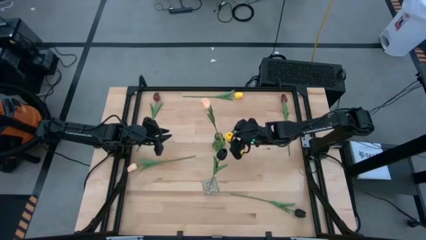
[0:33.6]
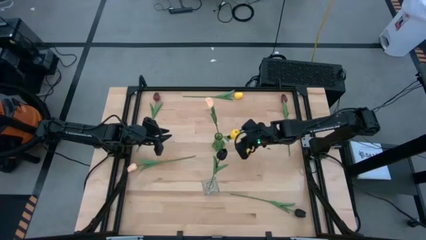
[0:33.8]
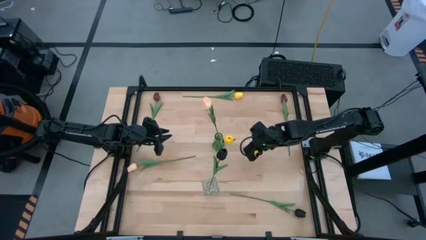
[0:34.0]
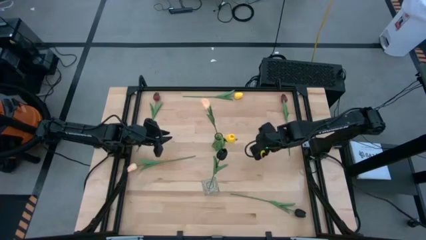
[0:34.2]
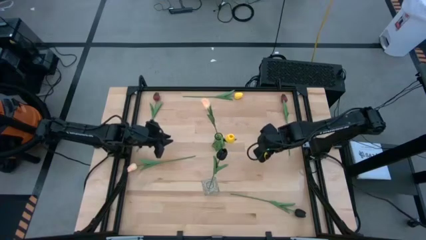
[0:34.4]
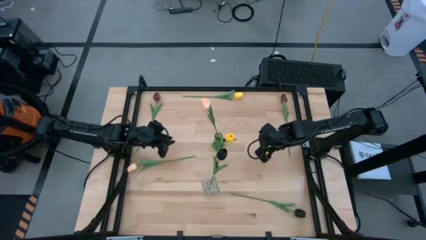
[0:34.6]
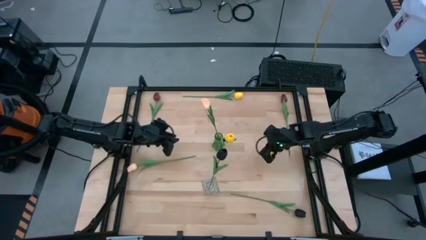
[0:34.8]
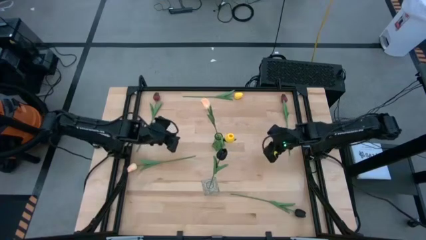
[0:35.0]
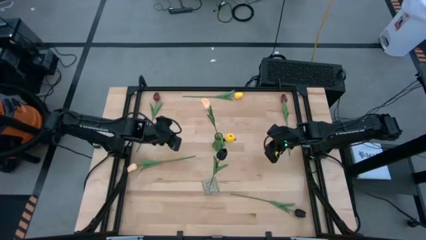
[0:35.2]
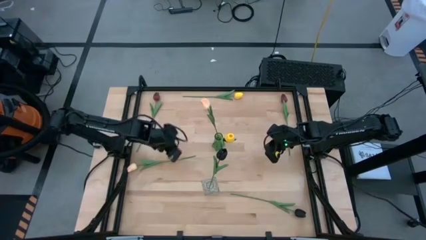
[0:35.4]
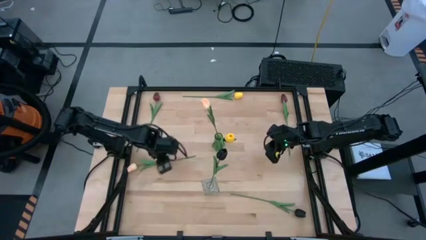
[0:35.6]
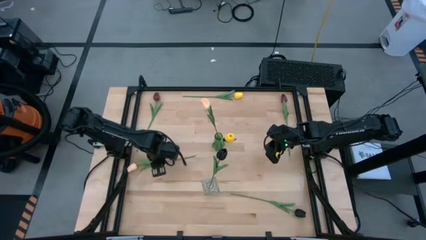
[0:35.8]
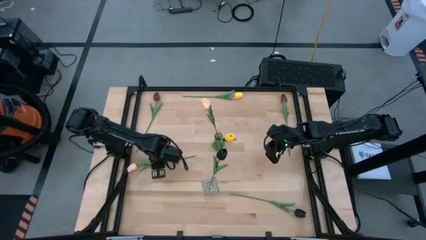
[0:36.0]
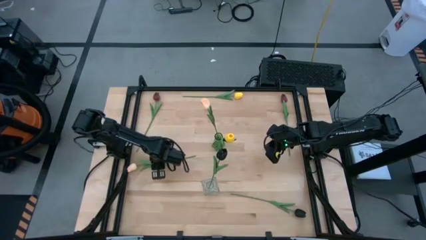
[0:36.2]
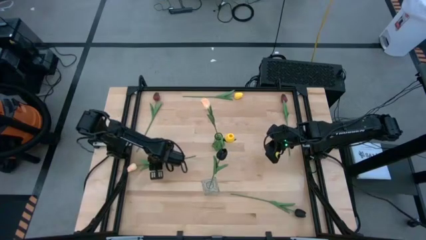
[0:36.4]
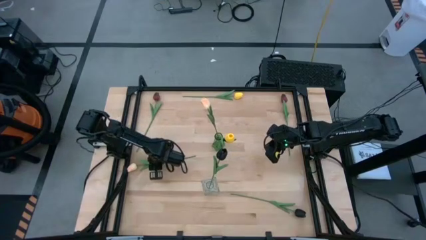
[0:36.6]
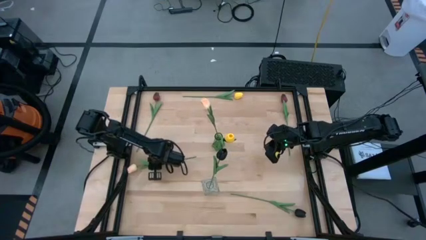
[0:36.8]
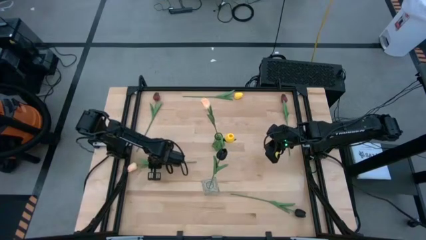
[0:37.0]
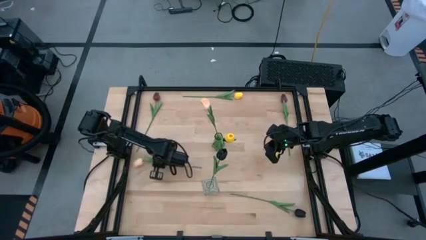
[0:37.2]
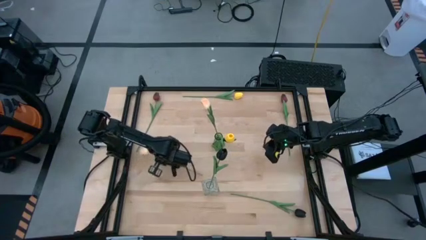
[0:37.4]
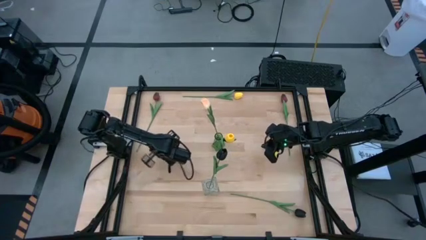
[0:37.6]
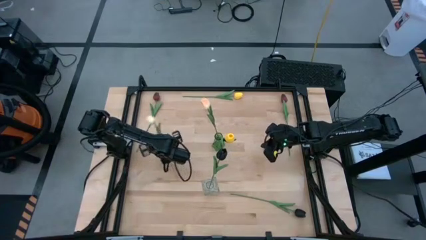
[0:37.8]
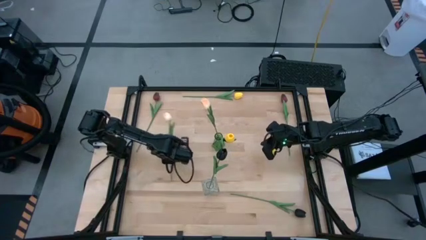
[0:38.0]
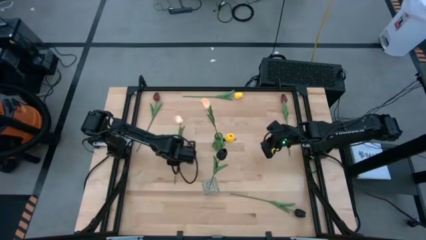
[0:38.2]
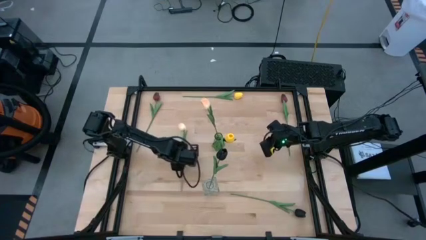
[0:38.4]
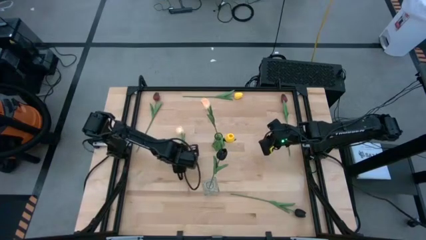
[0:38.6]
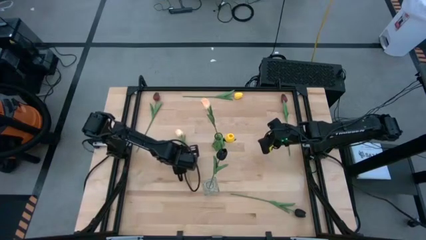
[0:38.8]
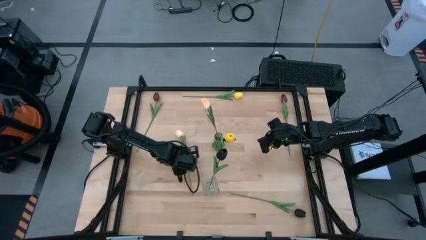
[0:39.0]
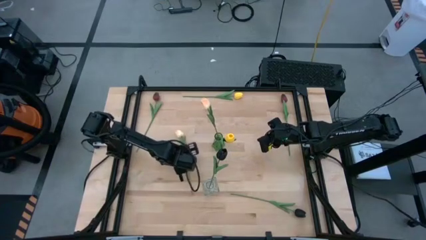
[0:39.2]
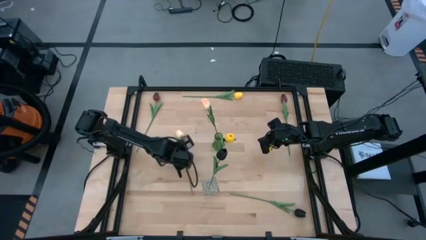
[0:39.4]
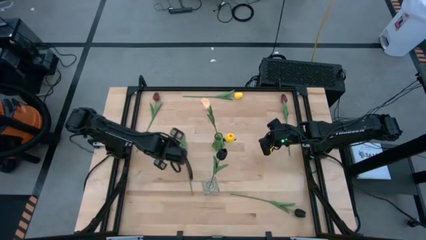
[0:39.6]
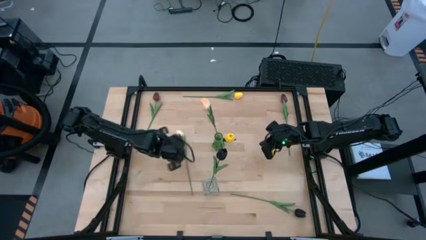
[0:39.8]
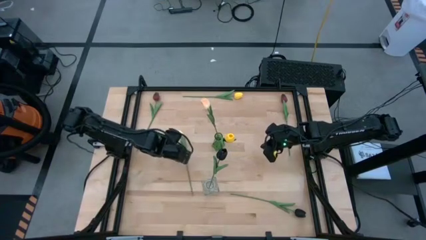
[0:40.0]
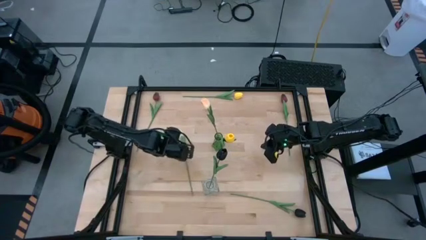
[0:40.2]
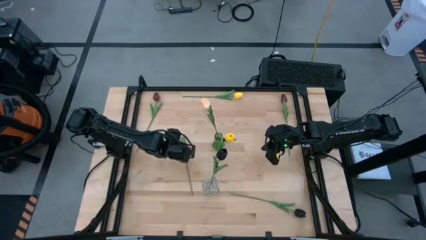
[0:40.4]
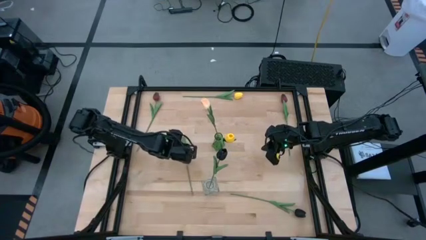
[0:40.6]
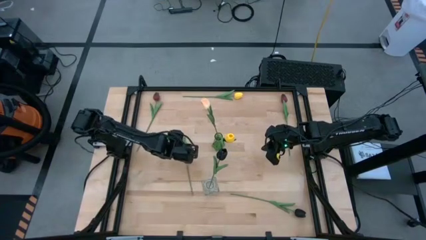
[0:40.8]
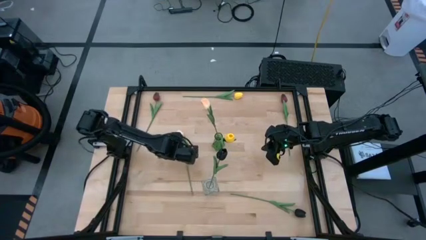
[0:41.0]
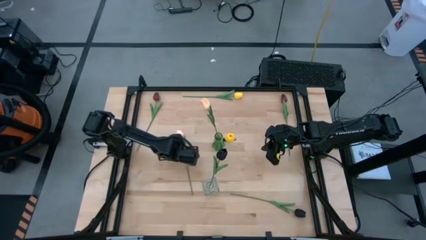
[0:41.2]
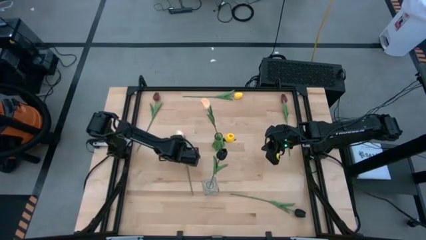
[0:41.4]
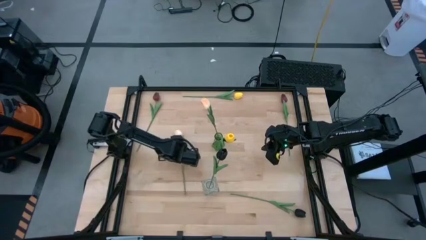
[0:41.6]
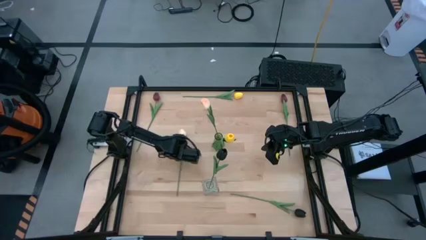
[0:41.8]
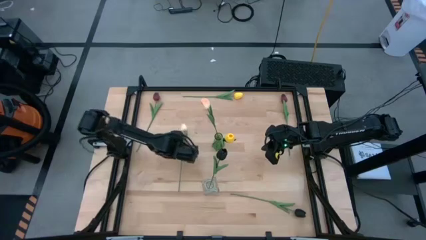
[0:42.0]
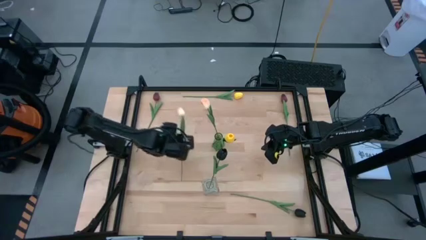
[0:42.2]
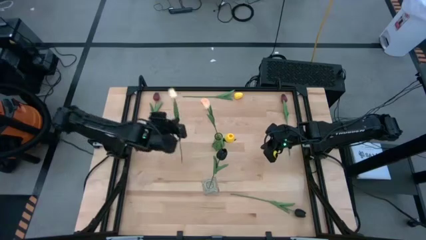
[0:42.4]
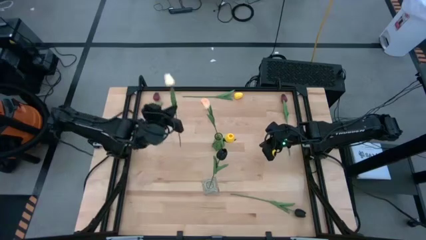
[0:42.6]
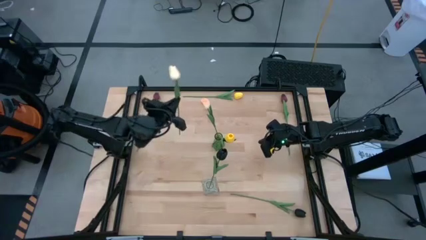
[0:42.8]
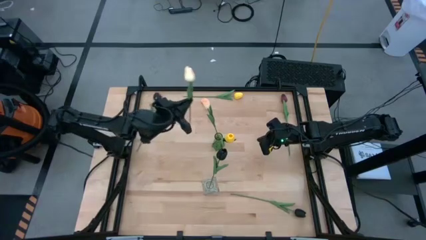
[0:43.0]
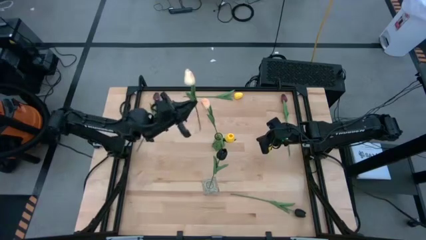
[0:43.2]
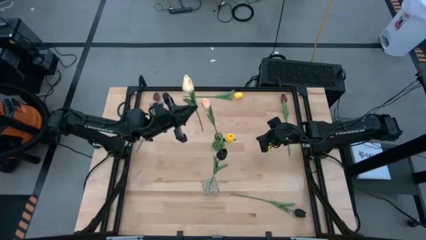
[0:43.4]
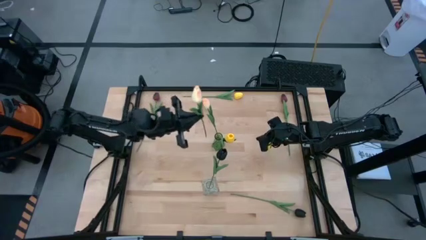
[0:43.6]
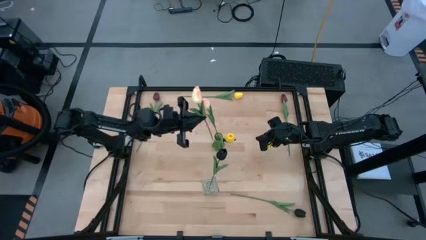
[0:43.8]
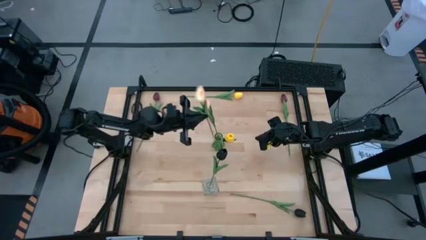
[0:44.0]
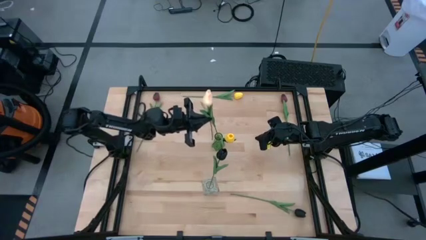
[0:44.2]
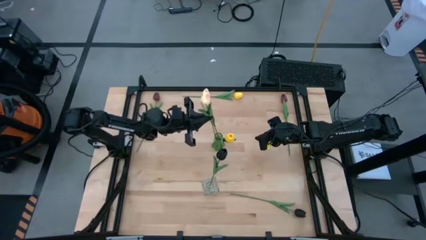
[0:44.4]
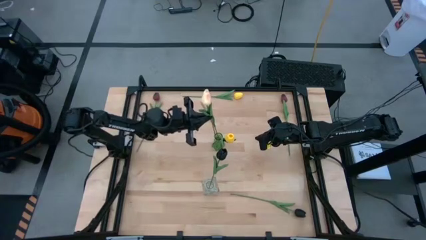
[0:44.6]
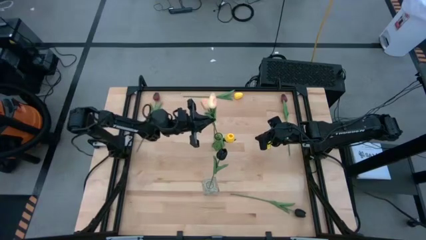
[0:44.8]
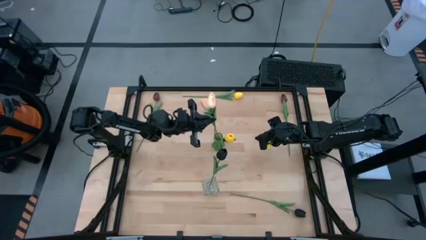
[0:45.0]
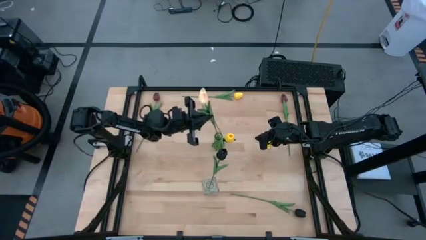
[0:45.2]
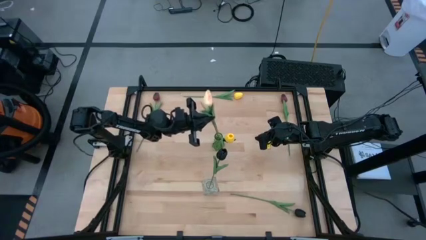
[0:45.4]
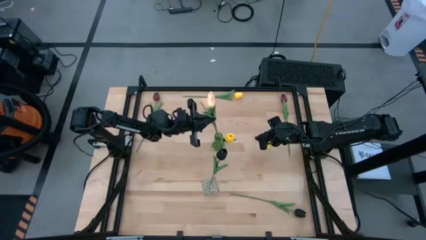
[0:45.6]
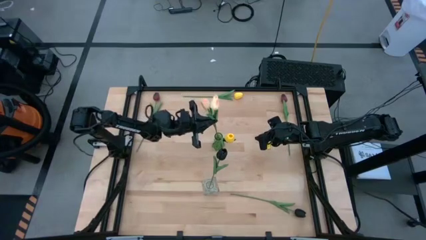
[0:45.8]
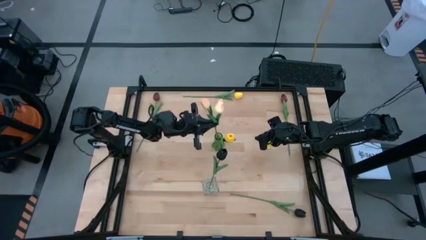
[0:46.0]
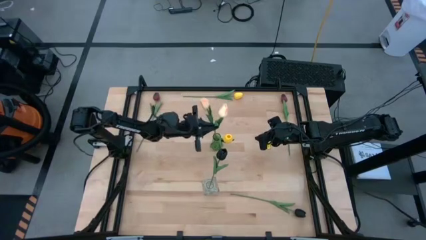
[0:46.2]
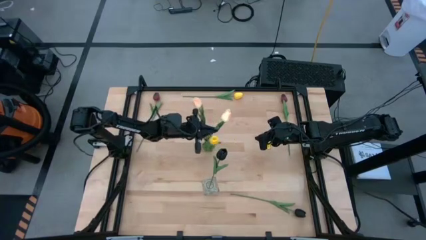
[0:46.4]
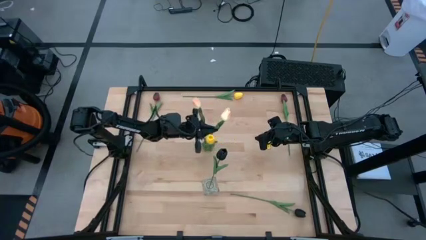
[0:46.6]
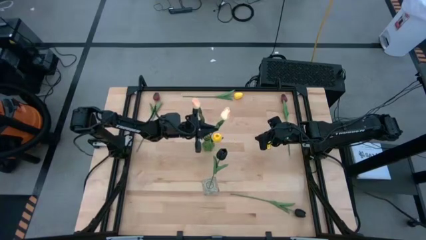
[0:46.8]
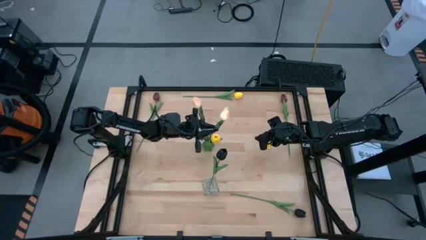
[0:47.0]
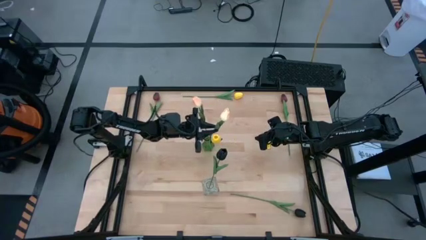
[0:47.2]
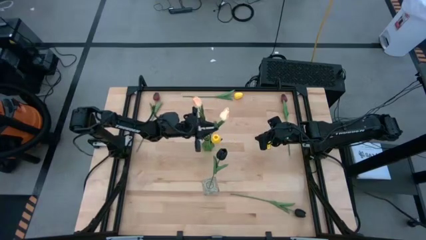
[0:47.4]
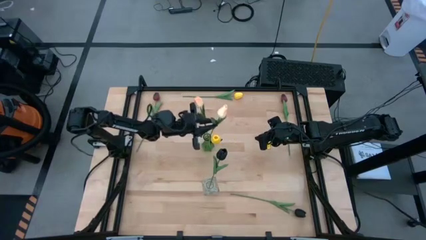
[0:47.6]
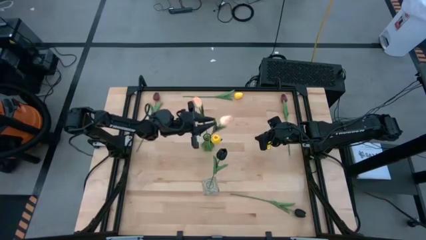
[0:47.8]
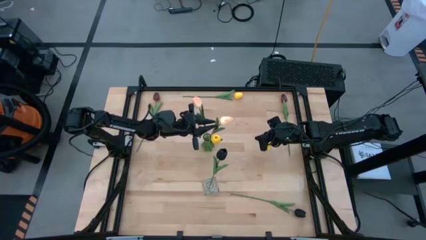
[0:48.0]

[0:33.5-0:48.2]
Task: Sort flowers into vase by color
Put the white flower into the green vase
